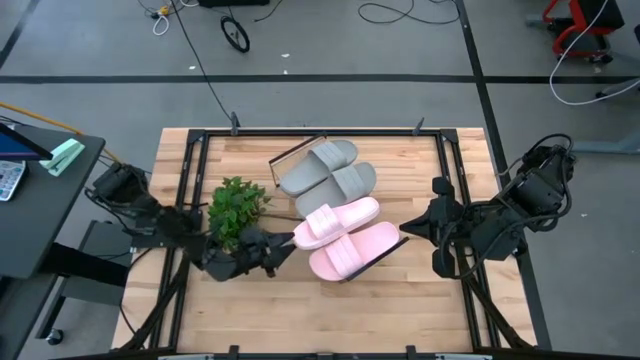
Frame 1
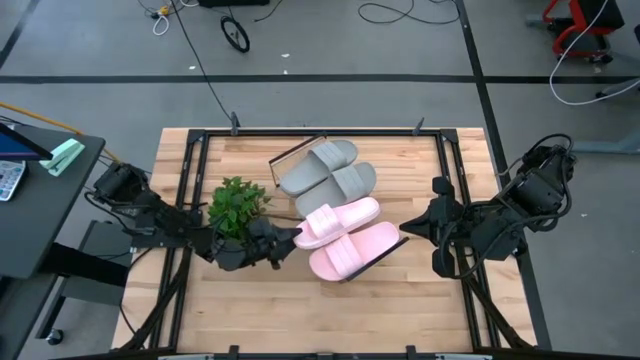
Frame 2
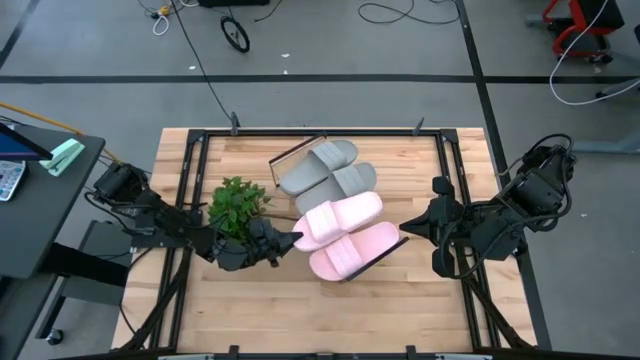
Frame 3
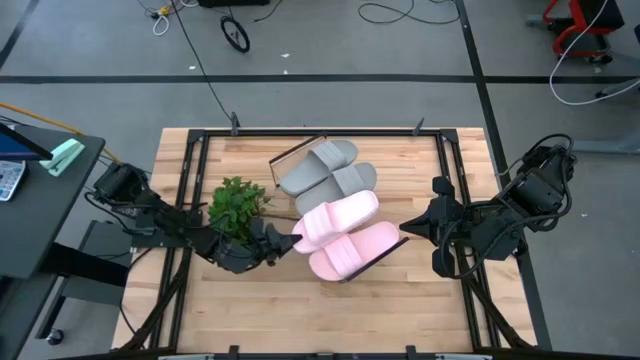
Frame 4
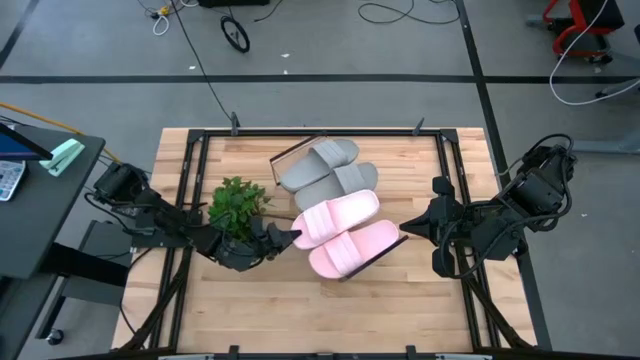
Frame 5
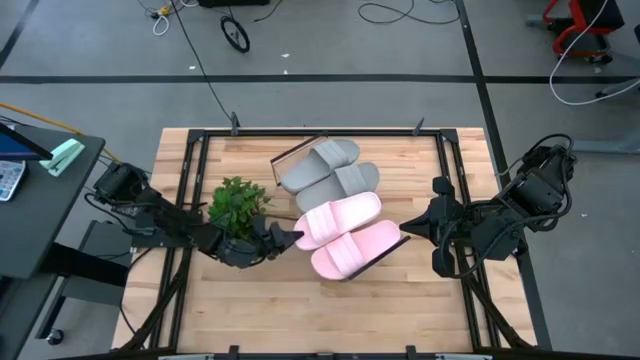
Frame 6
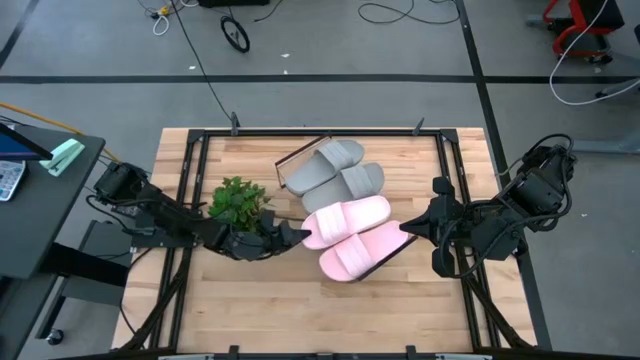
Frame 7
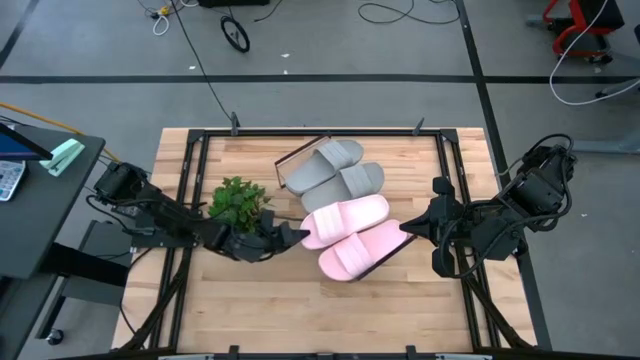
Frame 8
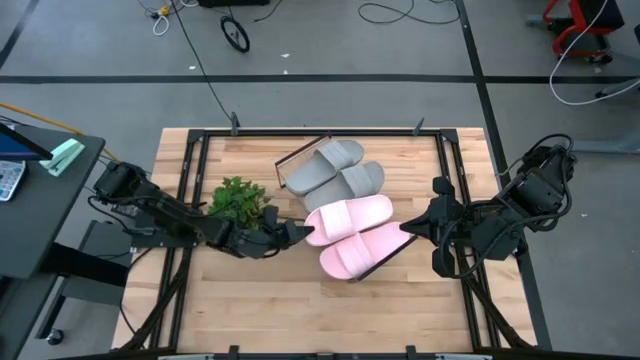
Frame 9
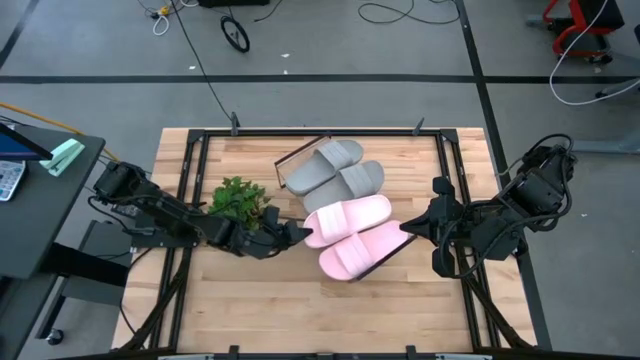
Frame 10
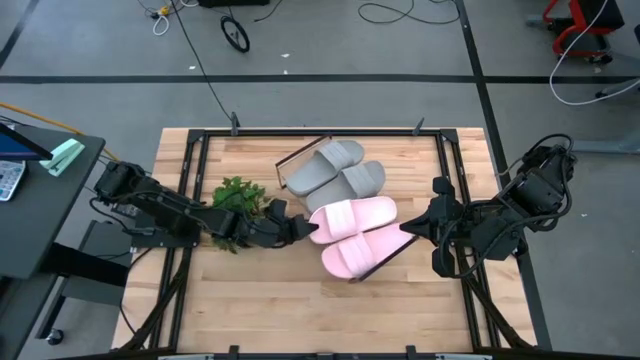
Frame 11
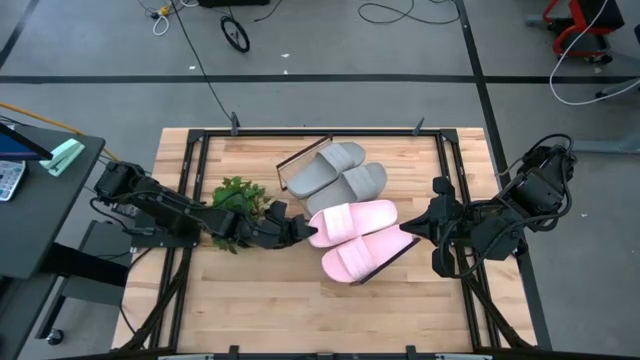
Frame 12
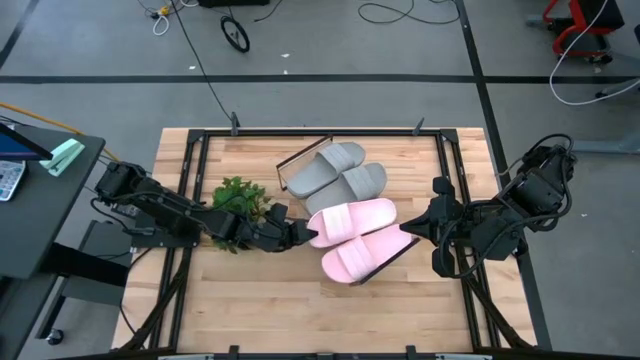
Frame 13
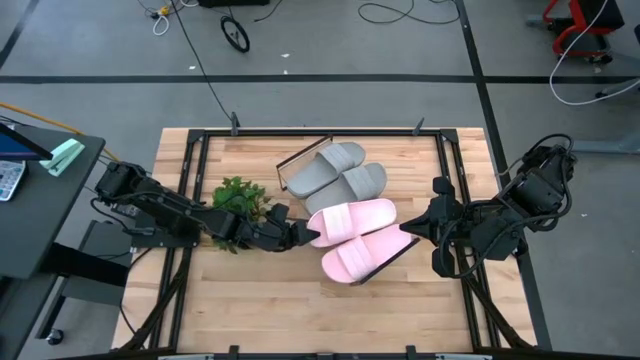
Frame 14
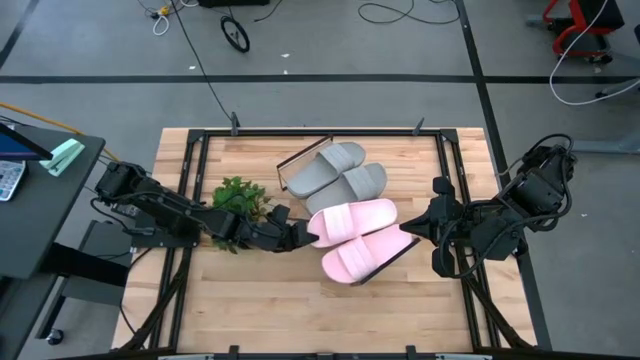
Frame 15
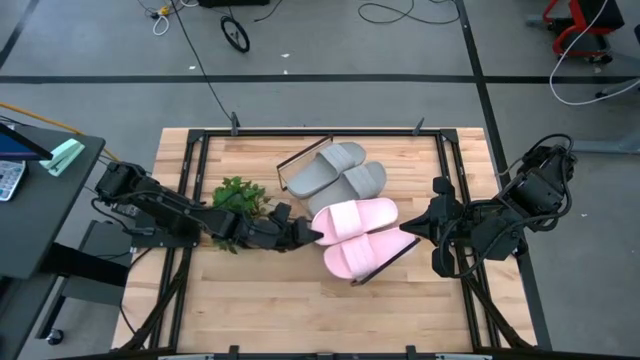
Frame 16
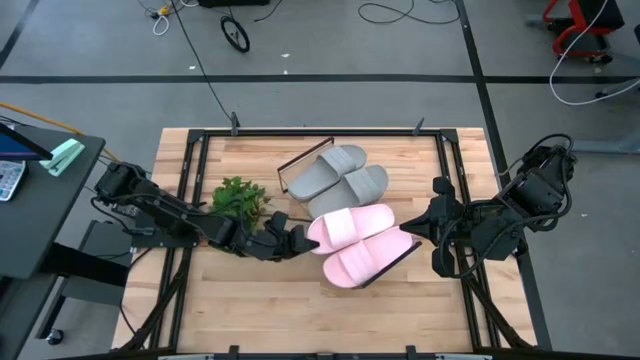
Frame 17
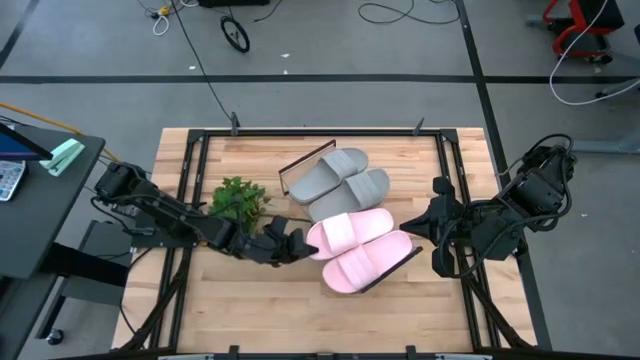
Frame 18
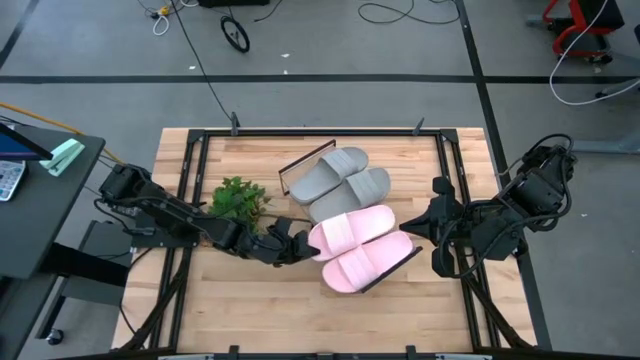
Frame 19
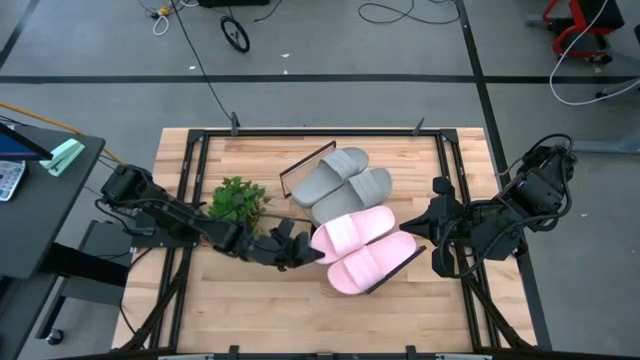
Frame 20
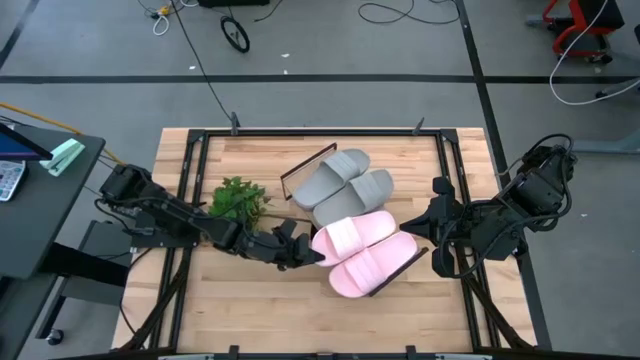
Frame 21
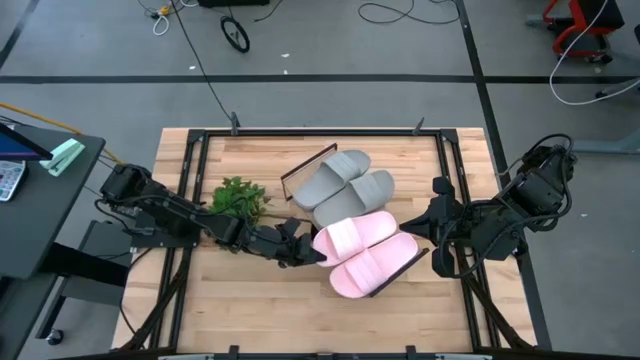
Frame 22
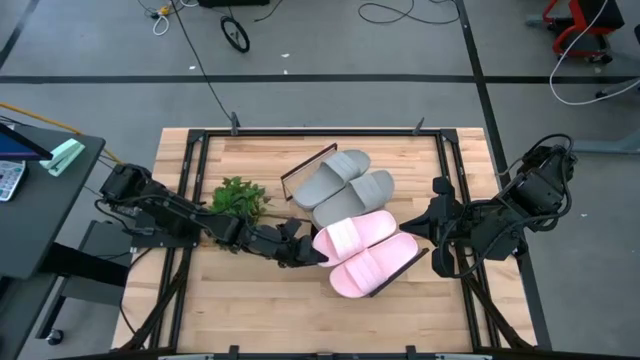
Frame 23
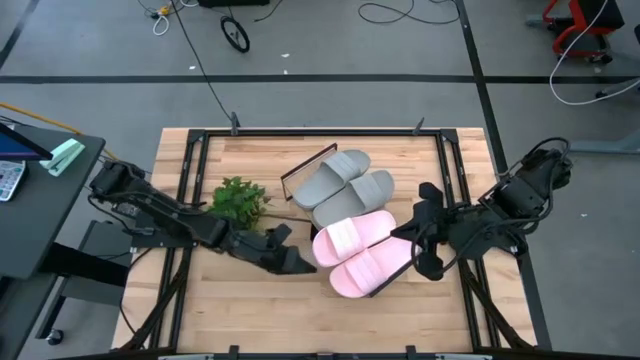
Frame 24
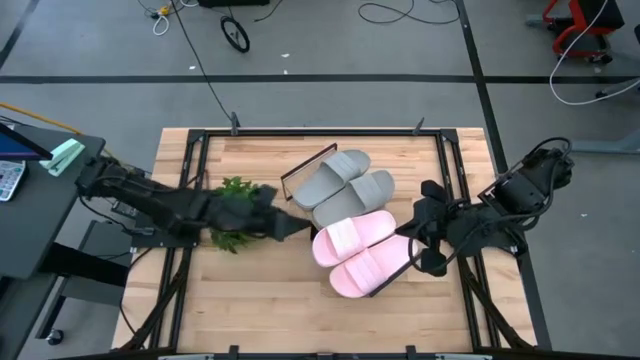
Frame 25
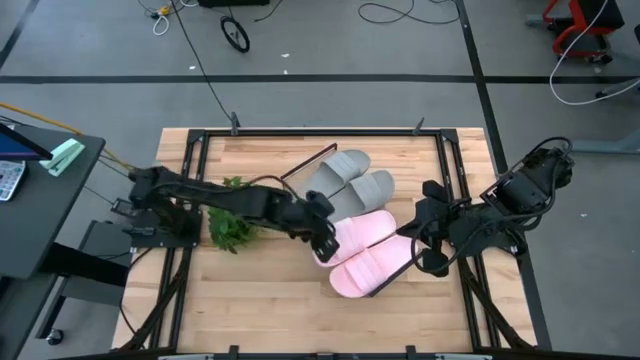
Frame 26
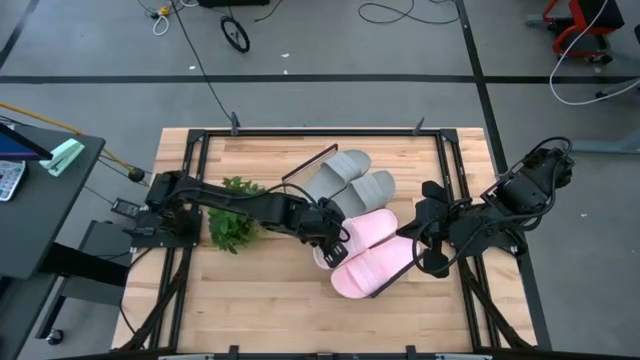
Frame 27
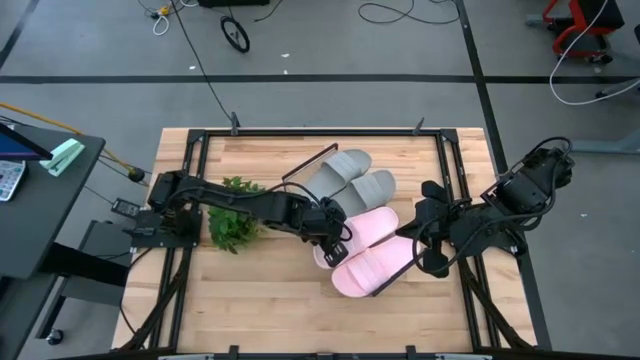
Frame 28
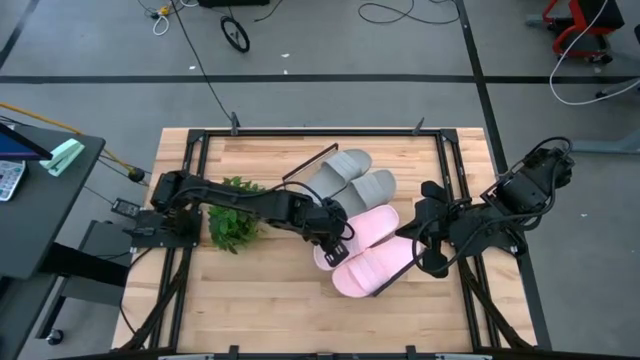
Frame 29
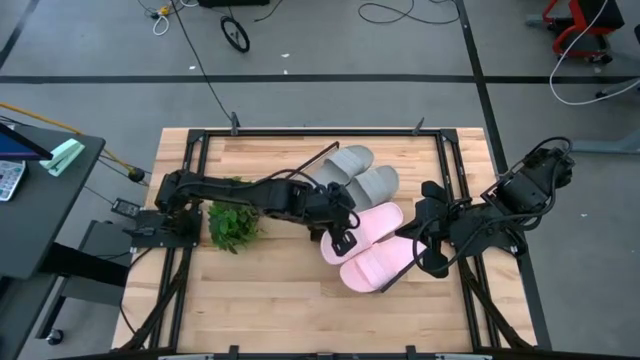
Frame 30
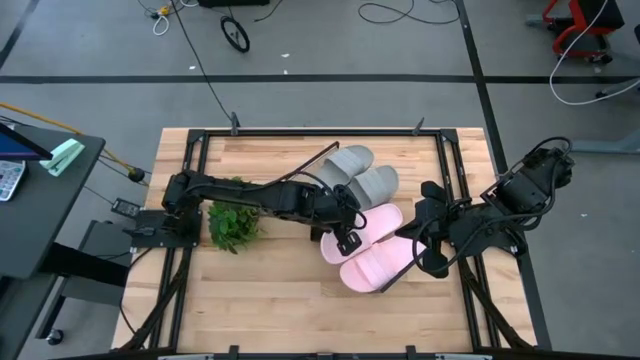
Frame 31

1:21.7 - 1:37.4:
Task: Pick and place slides into the shelf
Put the pink slide on the shelf

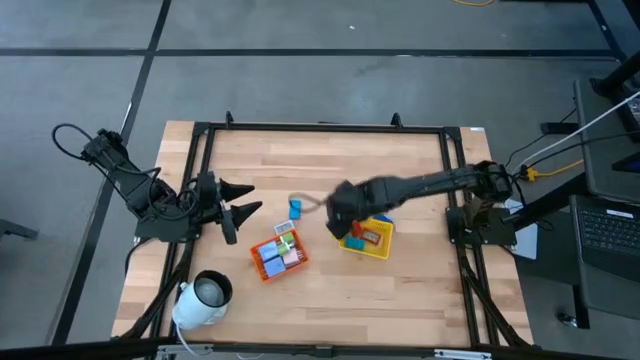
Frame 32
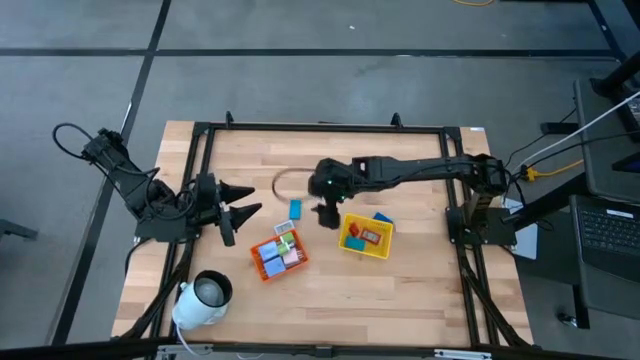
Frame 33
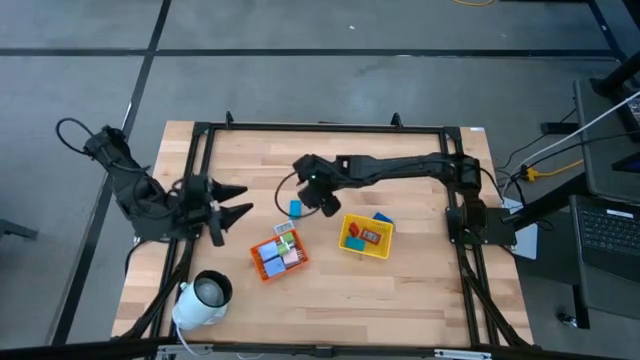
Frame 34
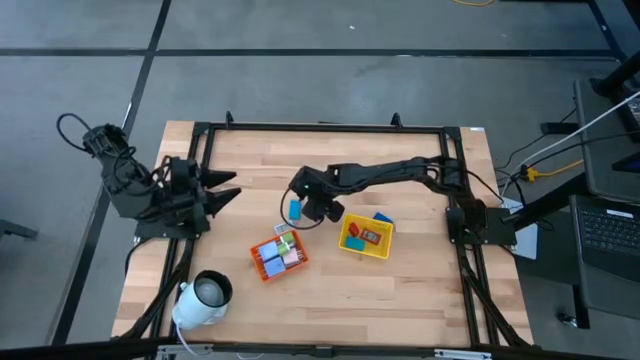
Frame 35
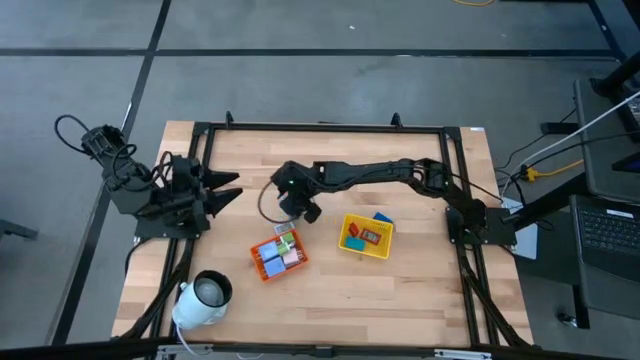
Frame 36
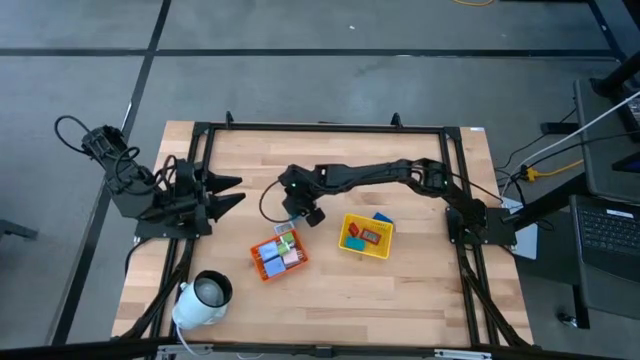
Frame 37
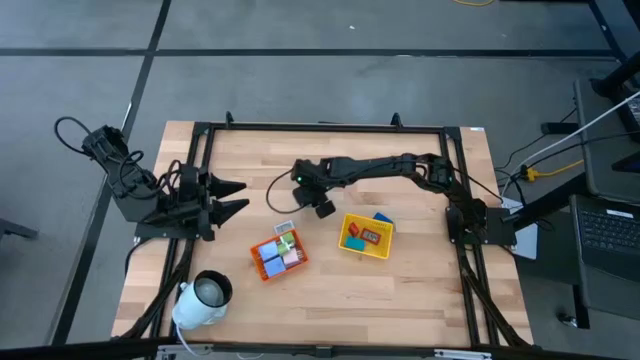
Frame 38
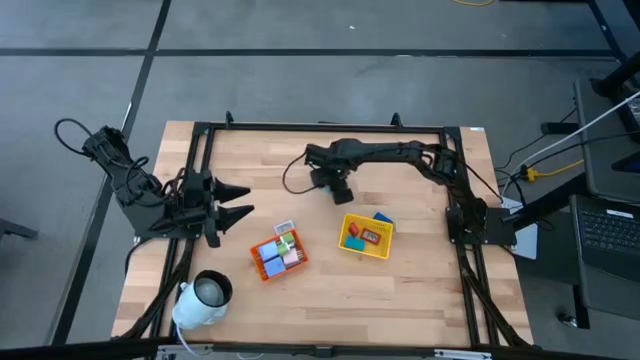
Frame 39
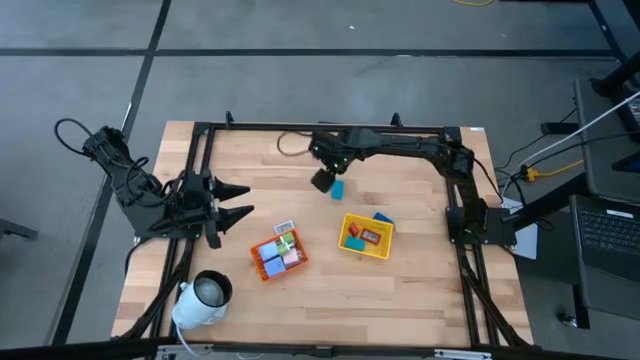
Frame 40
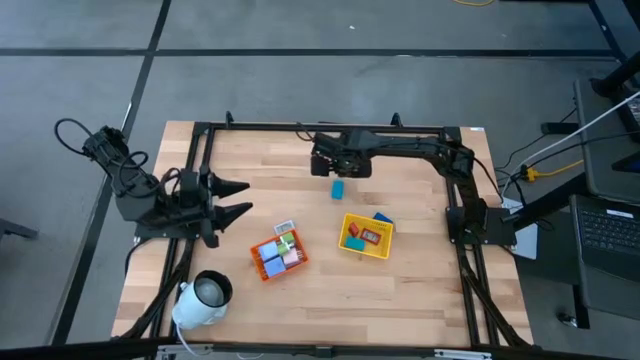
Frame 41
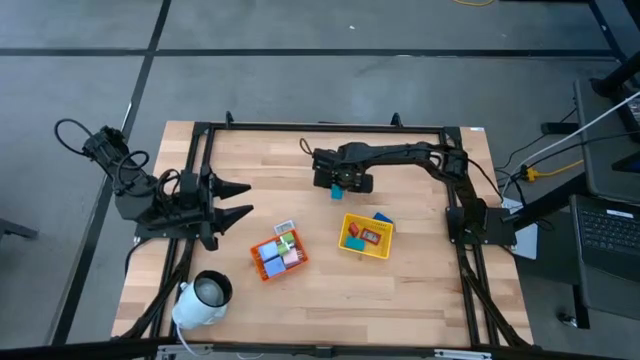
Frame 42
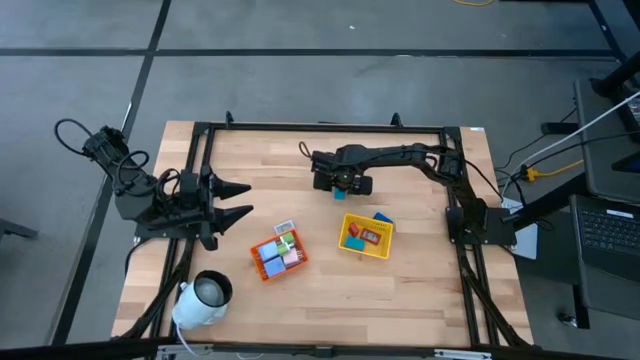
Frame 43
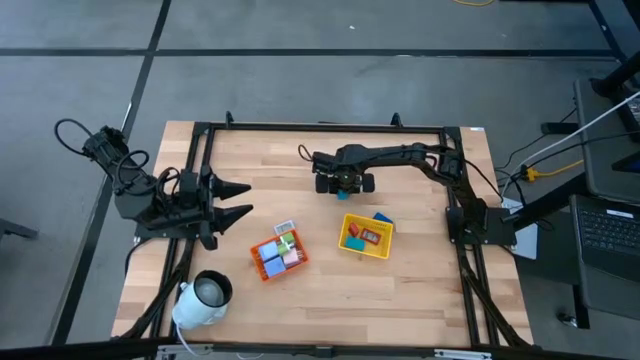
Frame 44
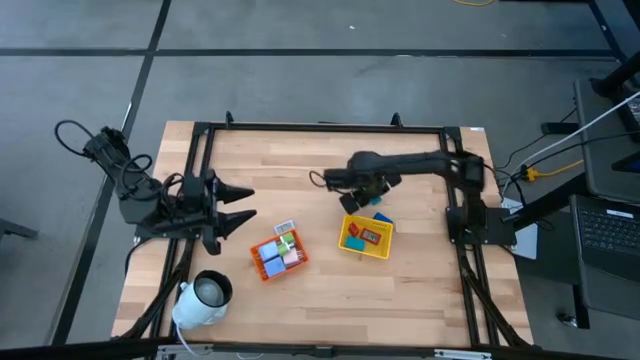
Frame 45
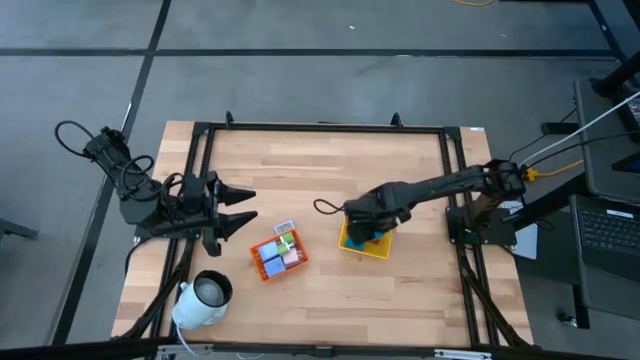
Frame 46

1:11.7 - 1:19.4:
Task: Pick & Place Office items
Put the light blue digital clock into the yellow bin
